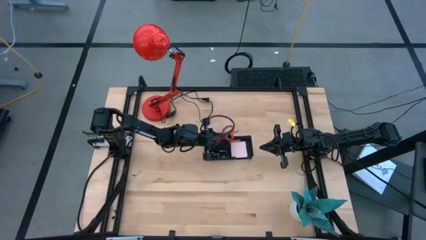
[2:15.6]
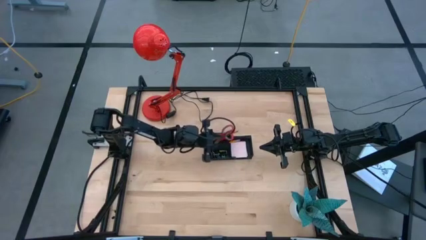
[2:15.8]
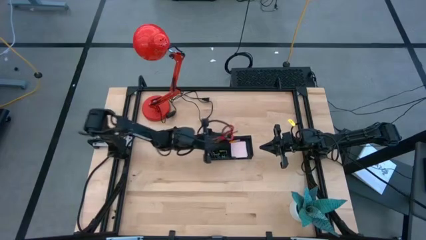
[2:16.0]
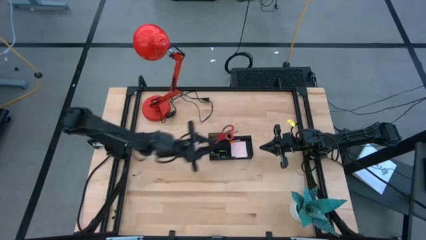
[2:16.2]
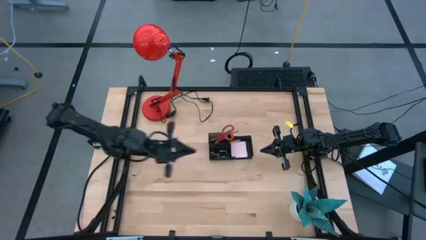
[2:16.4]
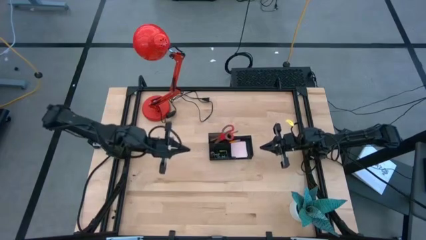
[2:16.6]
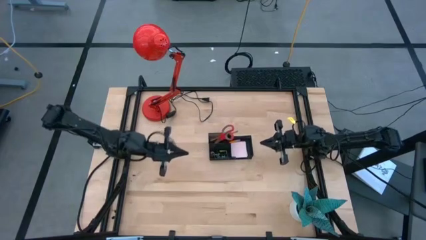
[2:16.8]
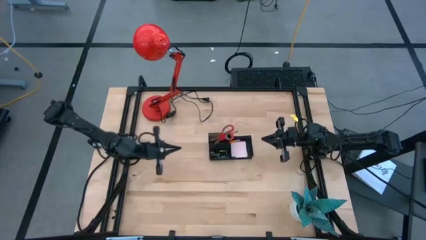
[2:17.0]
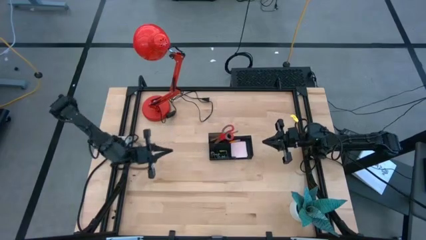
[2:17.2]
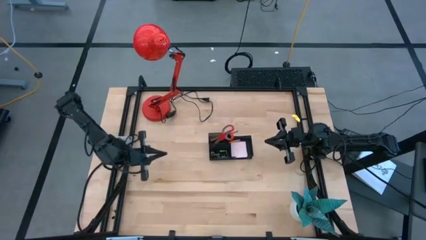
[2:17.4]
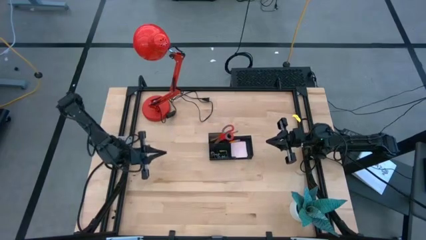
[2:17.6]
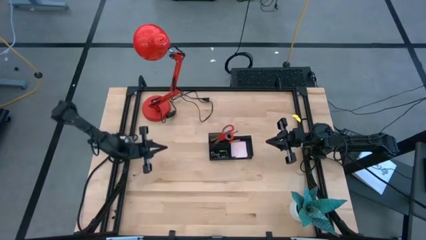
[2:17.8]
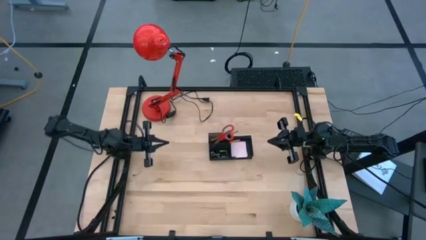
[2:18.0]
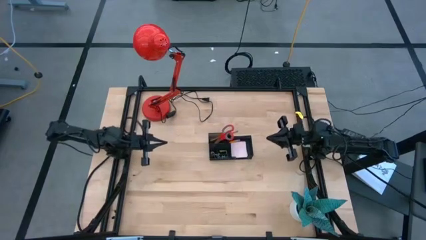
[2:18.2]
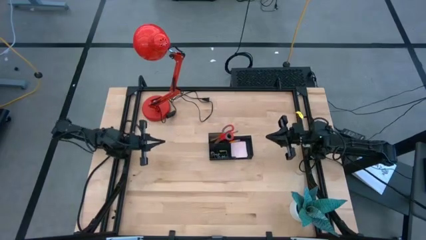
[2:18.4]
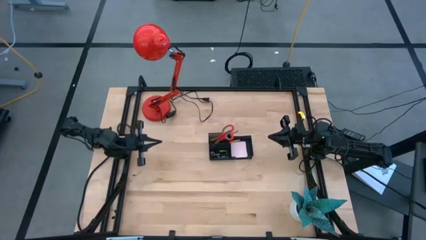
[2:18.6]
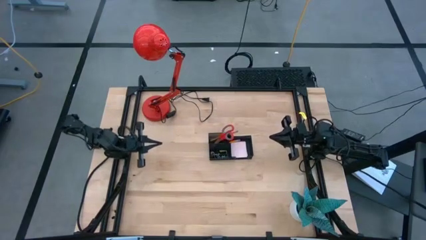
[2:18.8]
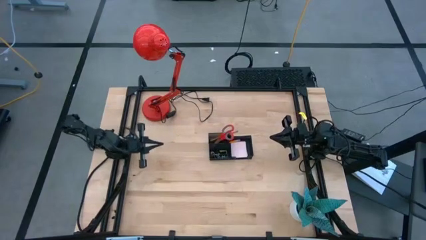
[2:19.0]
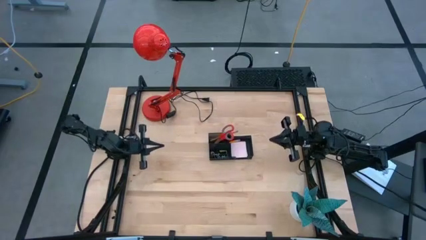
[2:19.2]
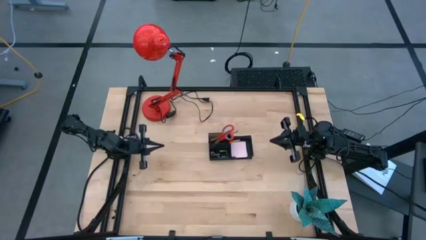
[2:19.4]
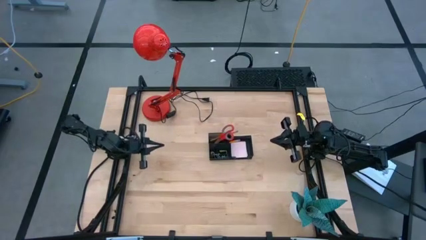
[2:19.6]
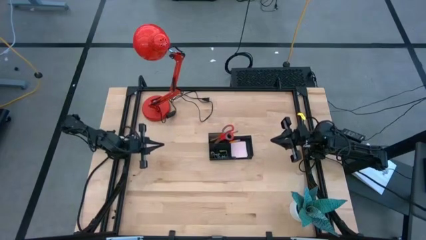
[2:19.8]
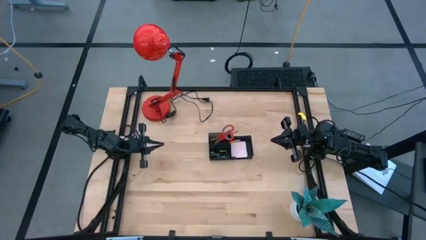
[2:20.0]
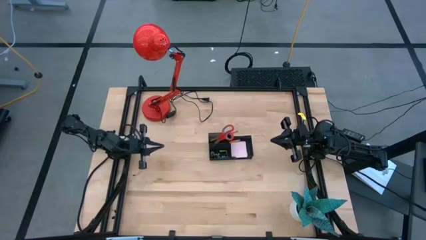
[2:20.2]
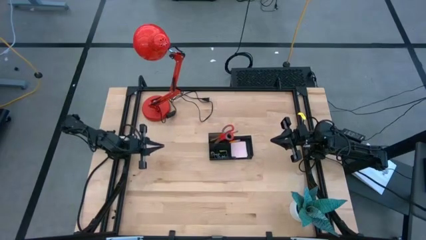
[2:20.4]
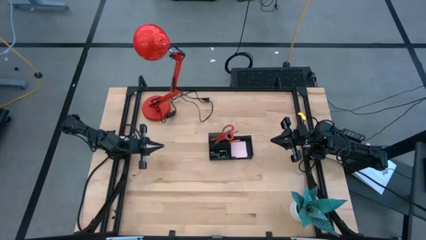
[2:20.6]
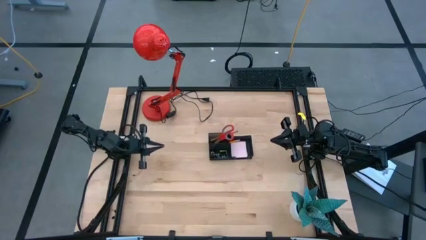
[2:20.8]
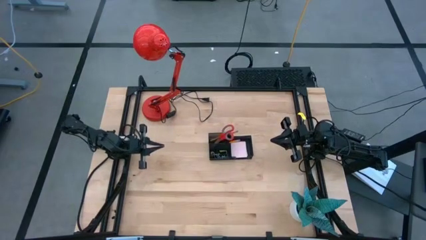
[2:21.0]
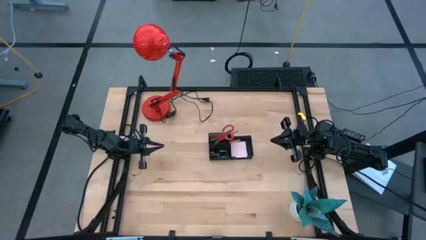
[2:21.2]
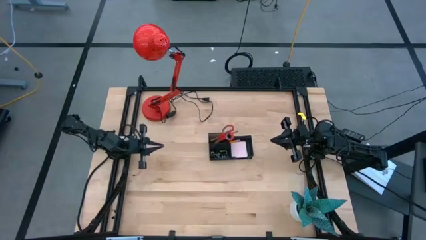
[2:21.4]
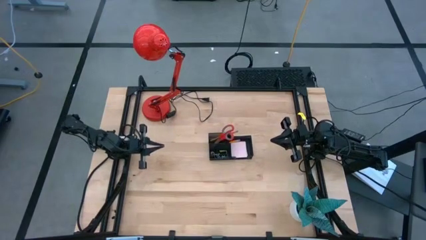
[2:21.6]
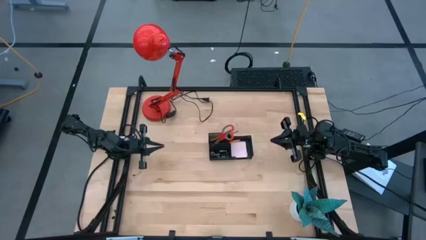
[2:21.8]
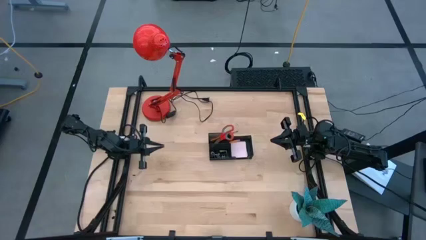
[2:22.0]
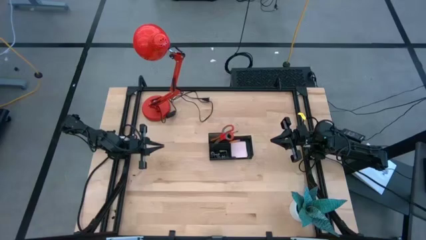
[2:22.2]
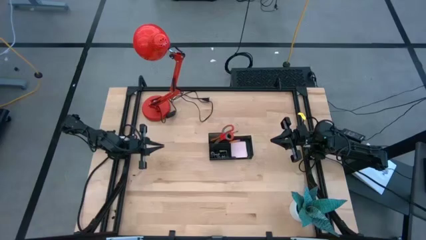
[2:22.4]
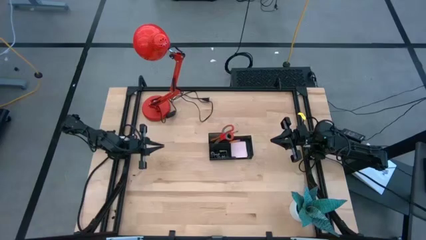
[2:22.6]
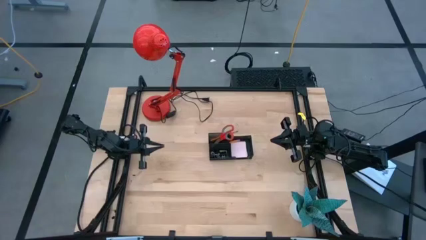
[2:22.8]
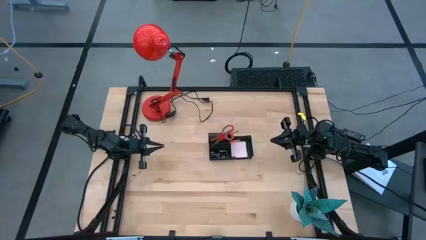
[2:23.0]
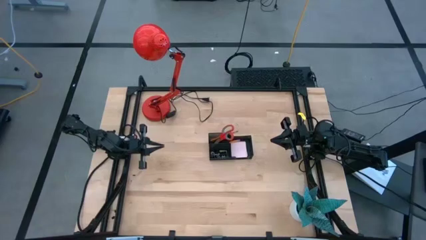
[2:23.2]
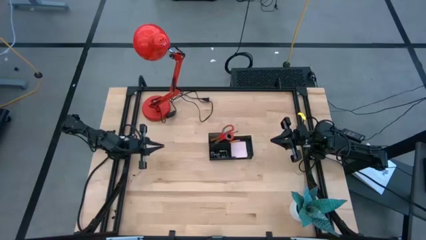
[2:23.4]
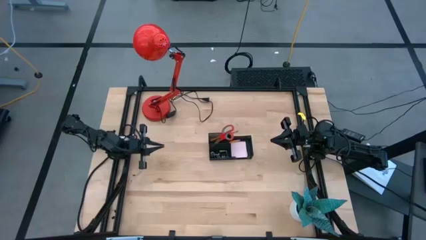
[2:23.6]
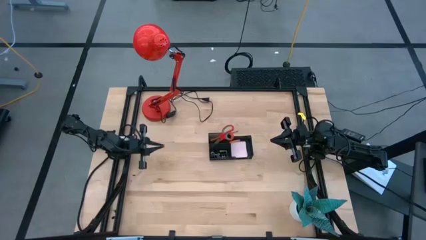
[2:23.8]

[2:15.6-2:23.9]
Task: Pick and place office supplies into organizer
Return to Home Position

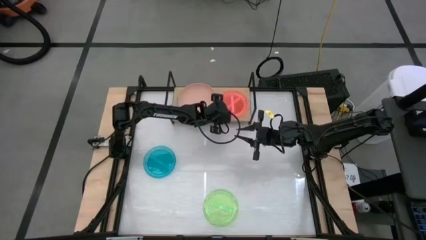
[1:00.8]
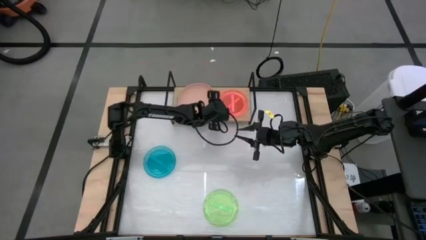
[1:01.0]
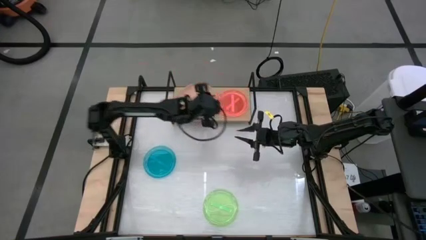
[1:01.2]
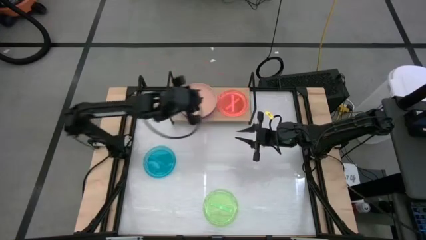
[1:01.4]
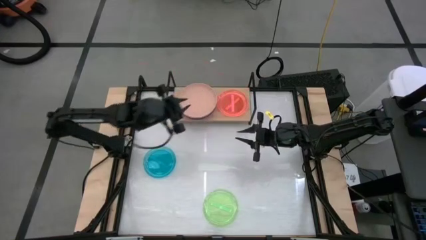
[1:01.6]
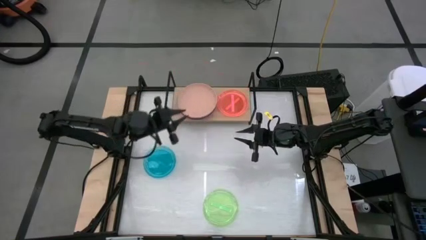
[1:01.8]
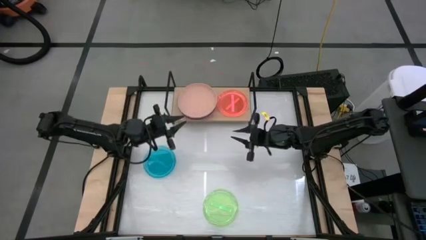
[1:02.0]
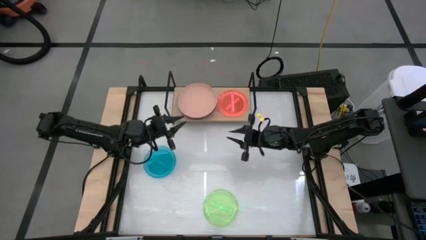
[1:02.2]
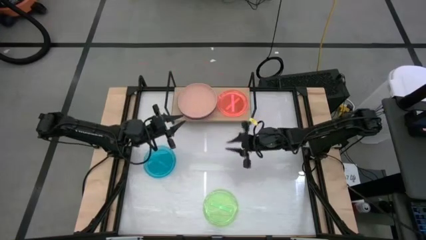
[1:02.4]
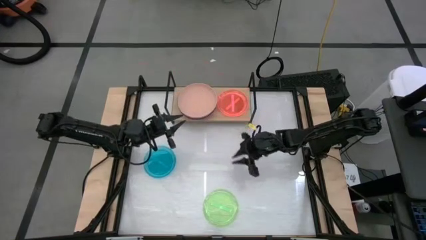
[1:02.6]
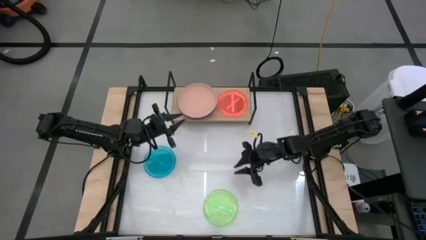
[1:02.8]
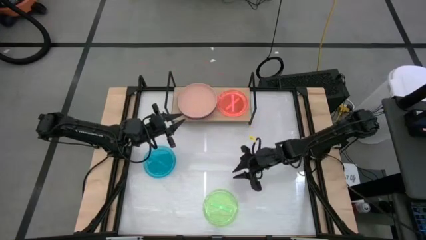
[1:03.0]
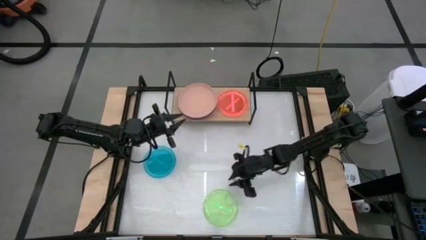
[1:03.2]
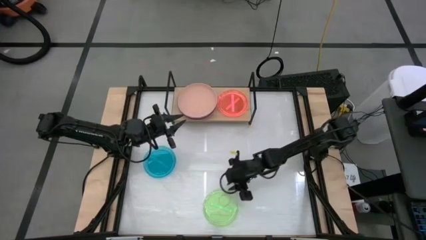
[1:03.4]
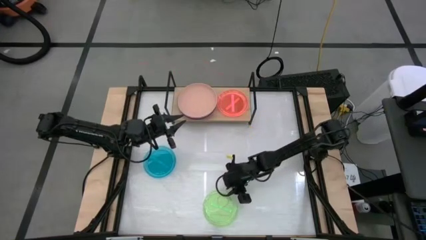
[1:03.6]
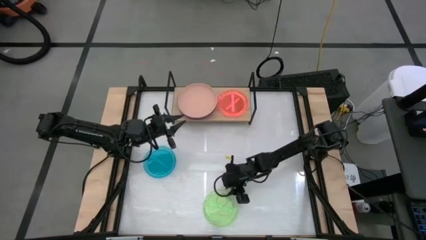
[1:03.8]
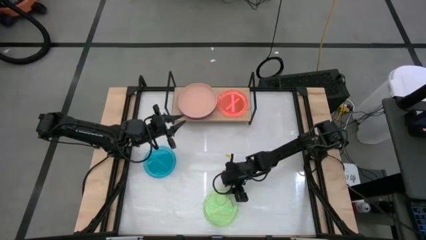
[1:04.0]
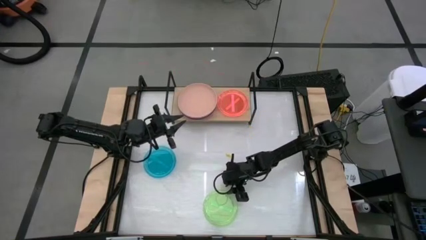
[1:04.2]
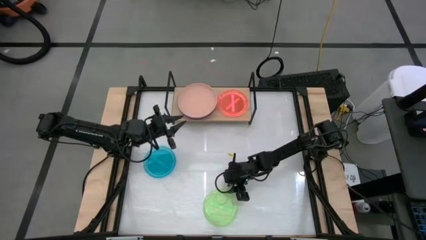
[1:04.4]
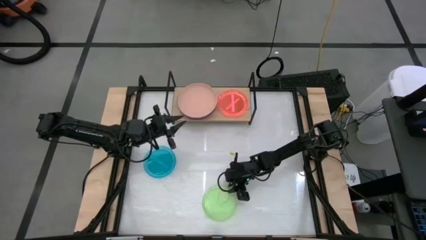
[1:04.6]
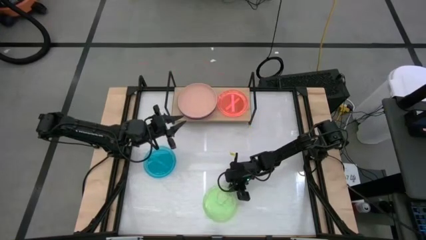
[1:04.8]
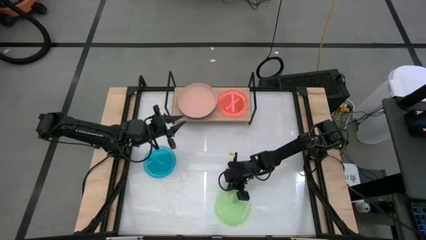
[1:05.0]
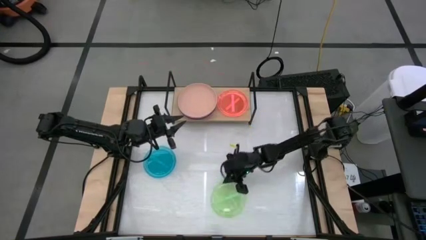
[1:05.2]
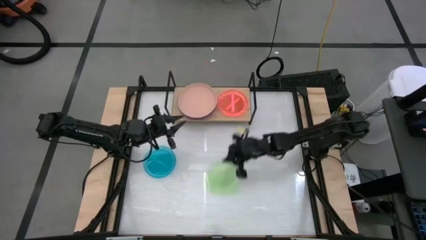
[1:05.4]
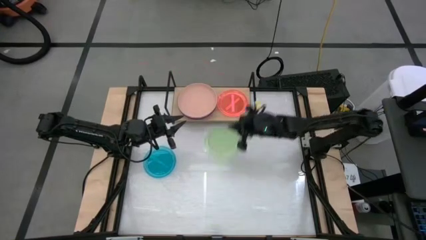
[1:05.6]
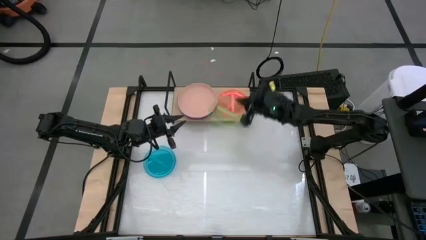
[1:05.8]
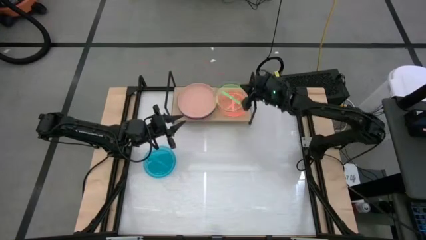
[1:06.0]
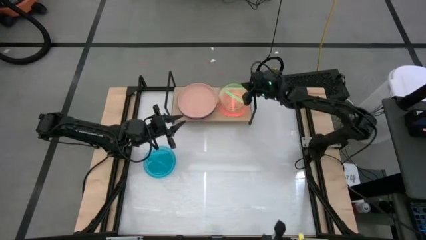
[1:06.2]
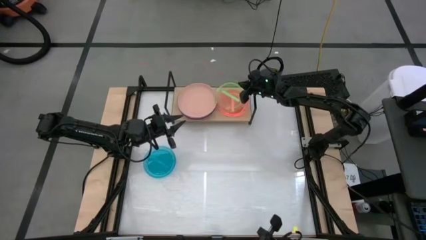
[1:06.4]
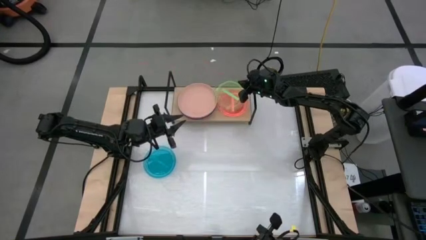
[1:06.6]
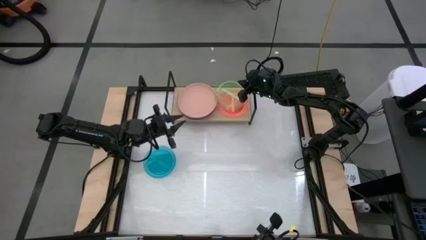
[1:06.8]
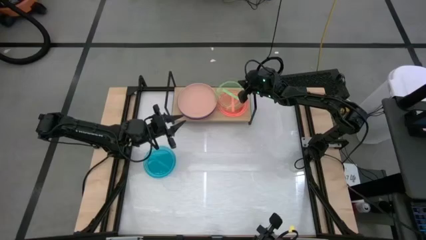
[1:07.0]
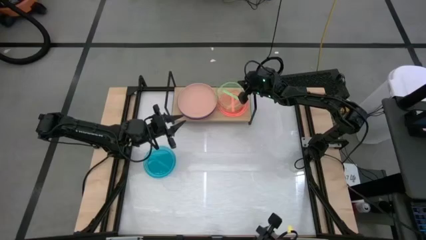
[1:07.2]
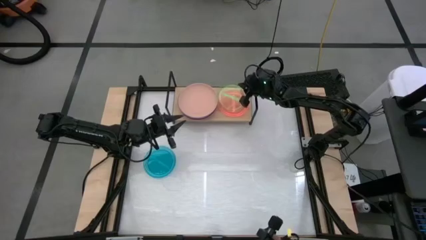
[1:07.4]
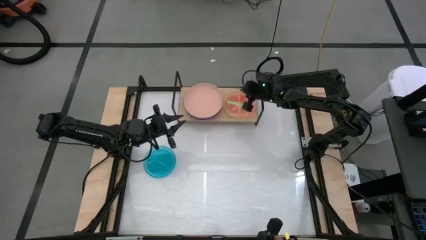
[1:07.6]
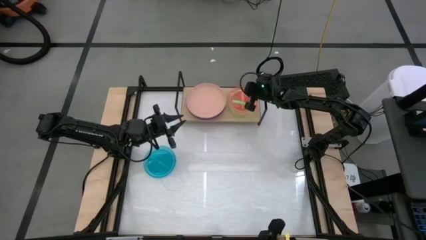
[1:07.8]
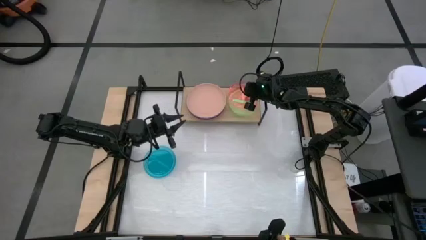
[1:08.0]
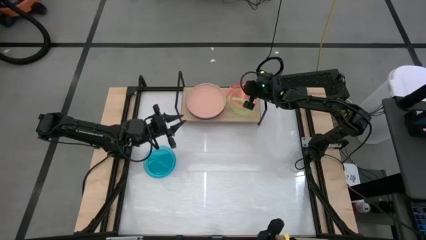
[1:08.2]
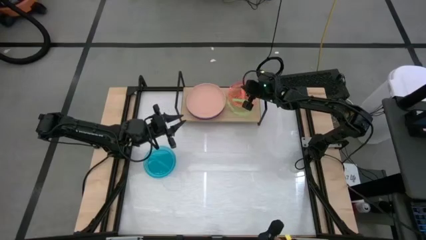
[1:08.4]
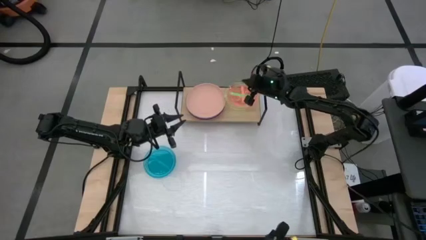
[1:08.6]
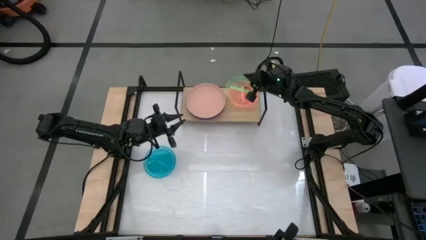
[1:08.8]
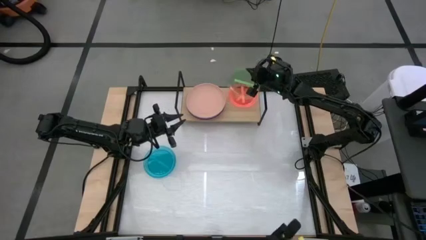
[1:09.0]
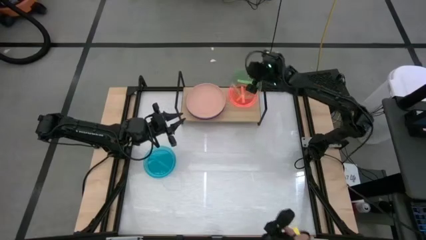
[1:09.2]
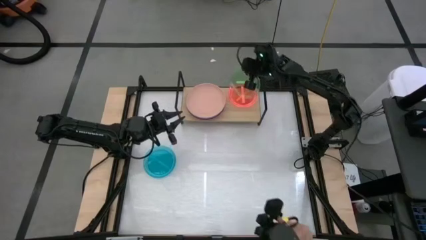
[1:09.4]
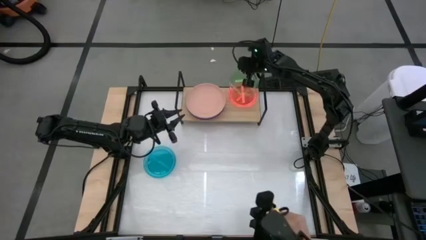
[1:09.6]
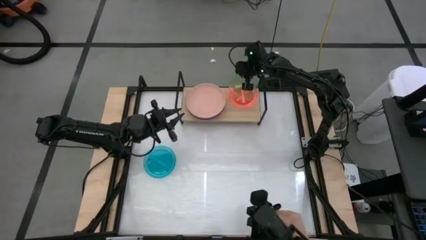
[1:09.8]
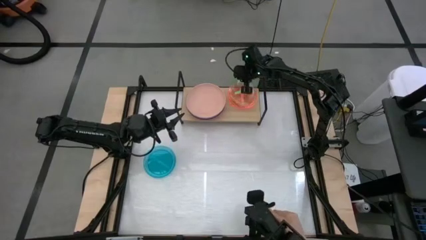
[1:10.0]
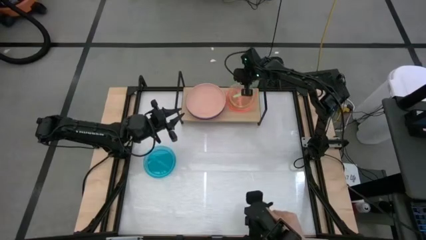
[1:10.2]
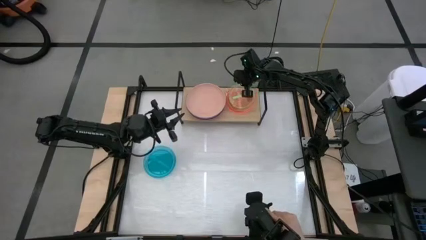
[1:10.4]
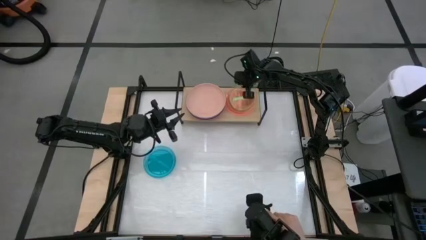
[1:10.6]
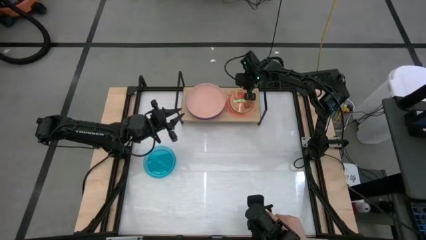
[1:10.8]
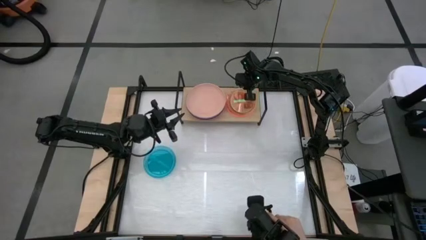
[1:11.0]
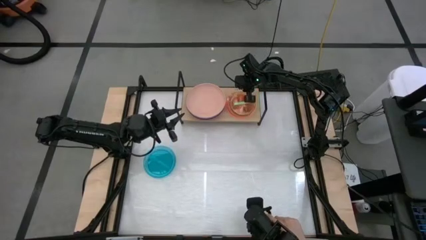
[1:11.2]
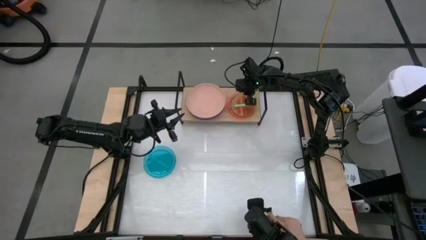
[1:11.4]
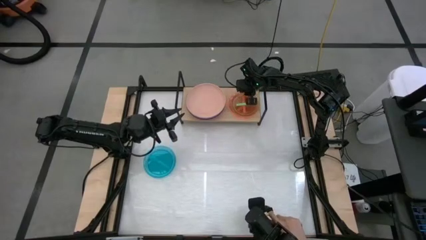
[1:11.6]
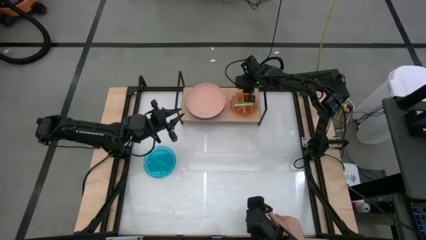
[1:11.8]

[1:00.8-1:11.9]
Task: Place and stack plates onto a shelf
Stack the green transparent plate on top of the pink transparent plate on the shelf
